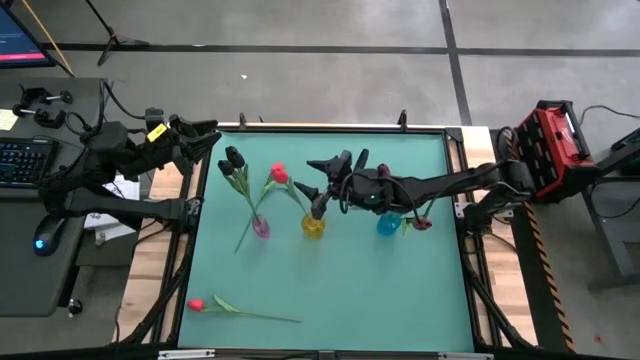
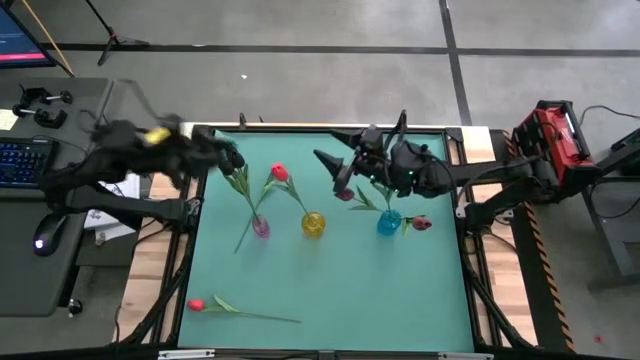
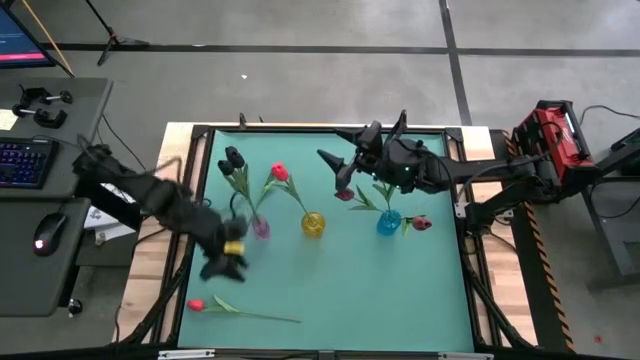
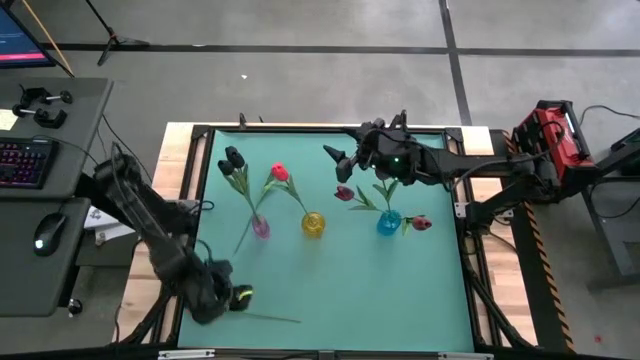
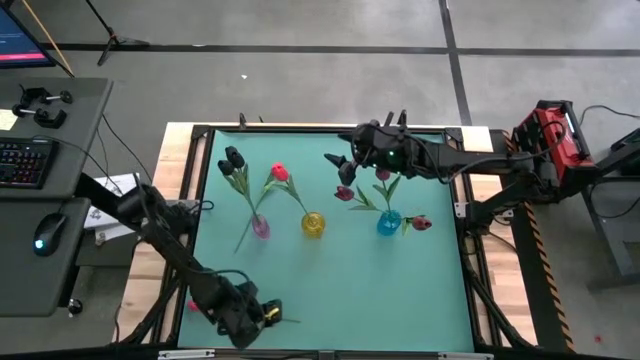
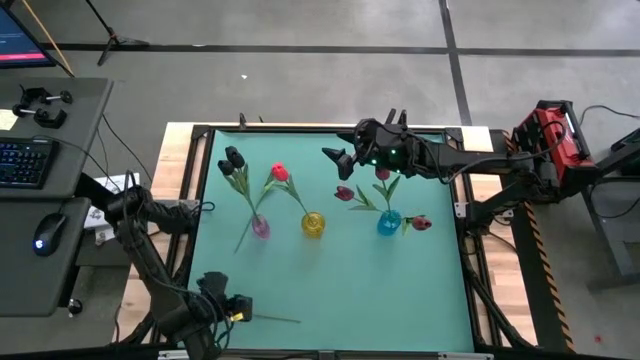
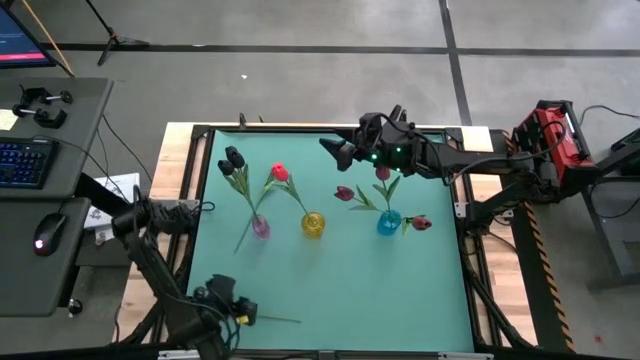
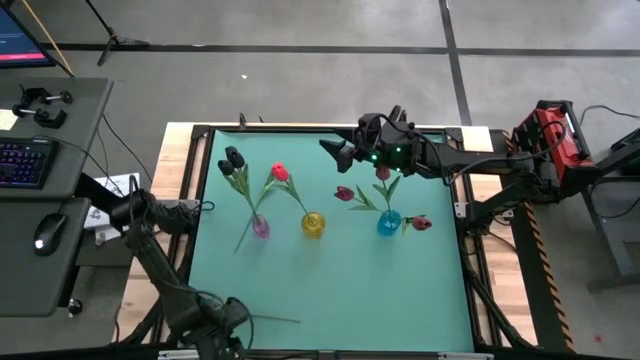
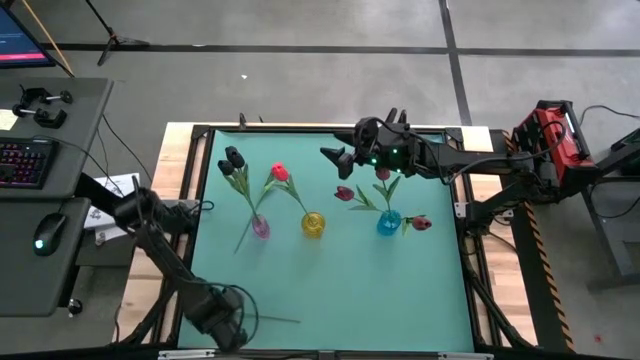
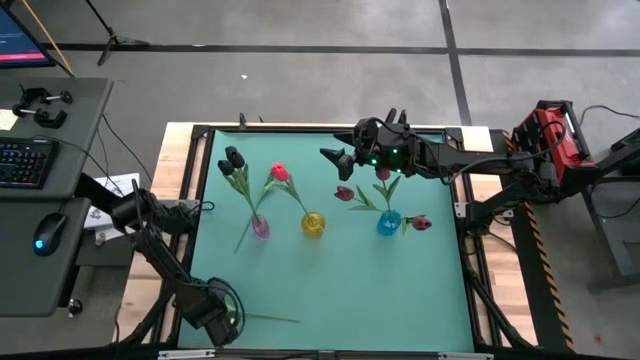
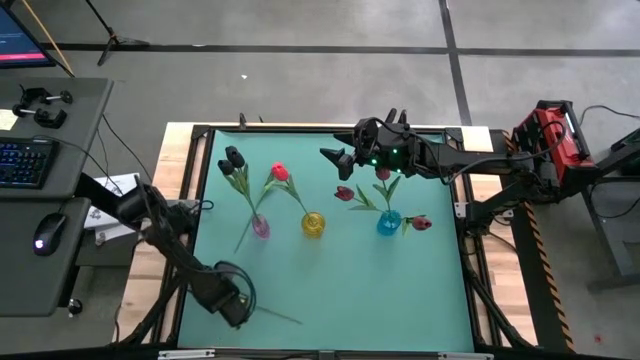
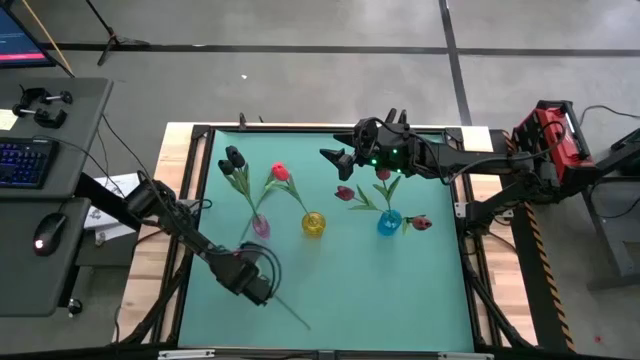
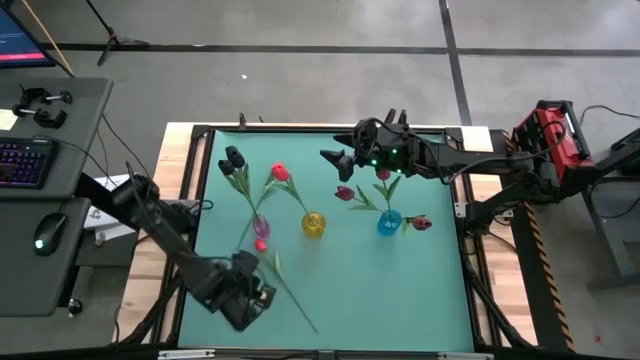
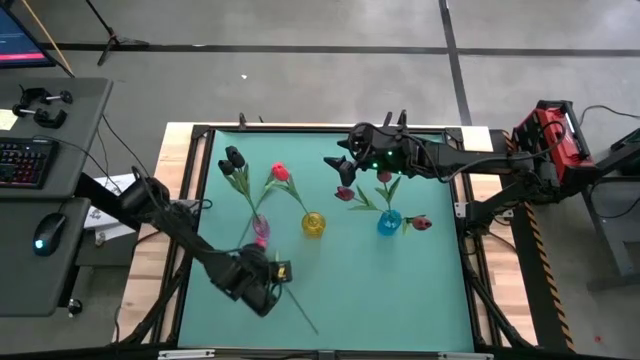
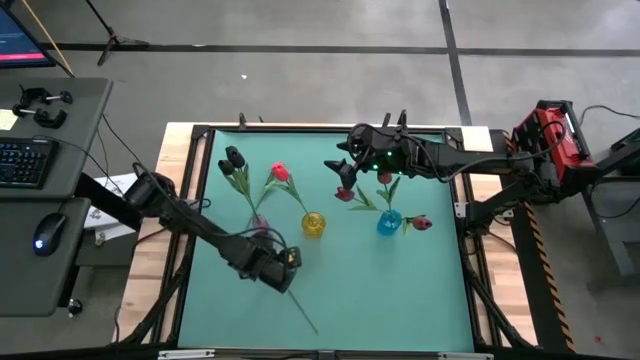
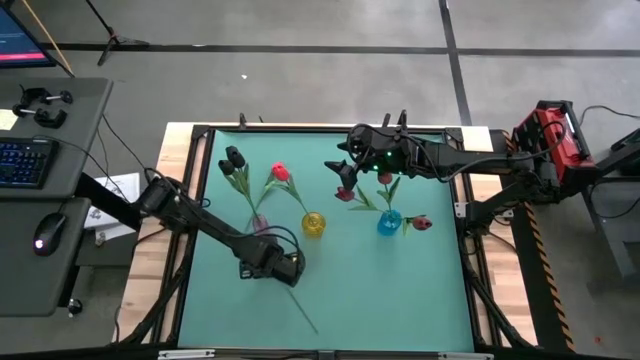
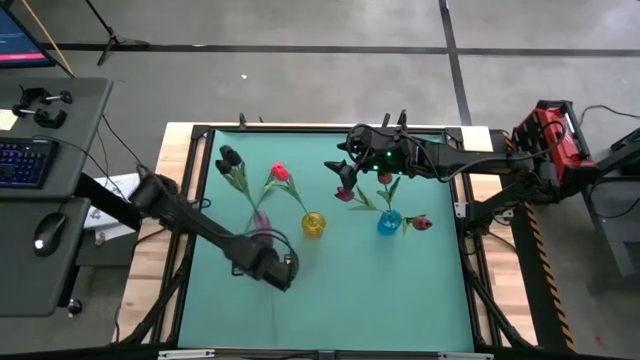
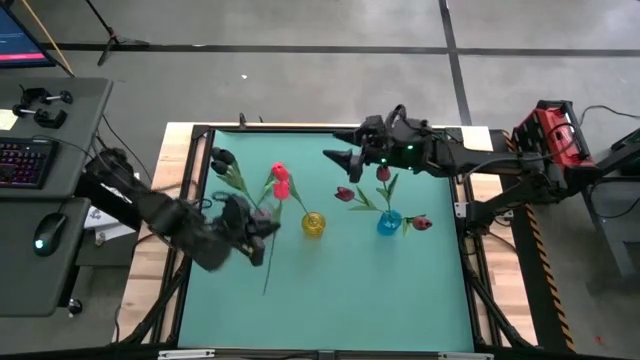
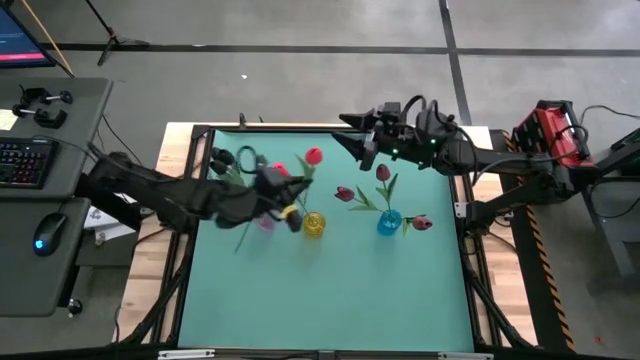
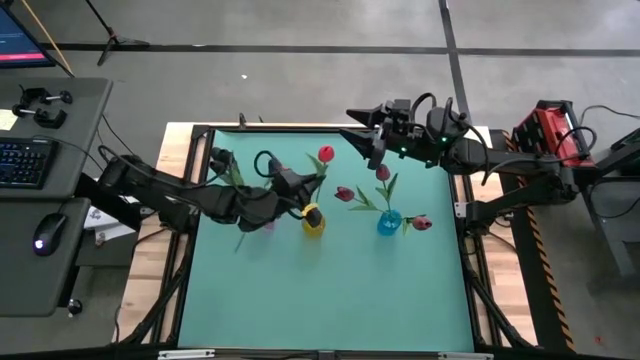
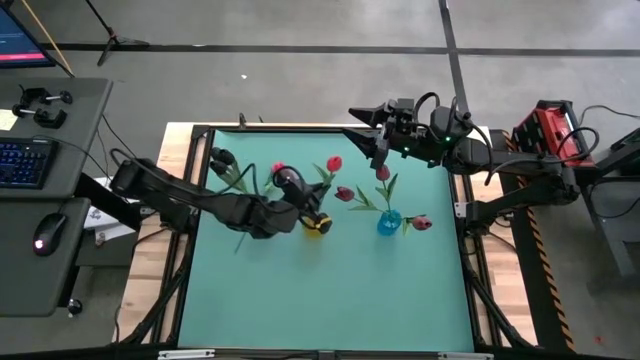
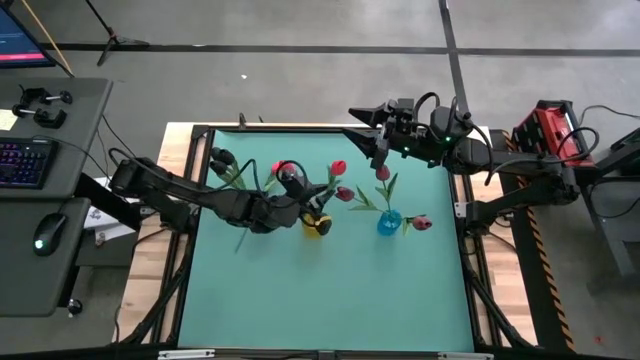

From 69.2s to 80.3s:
Task: Sort flowers into vase by color
Put the bottom pink flower into the yellow vase

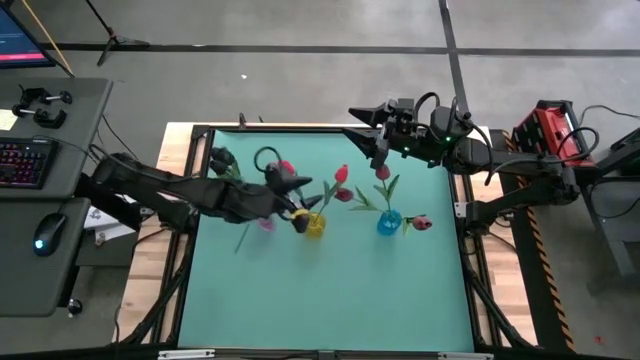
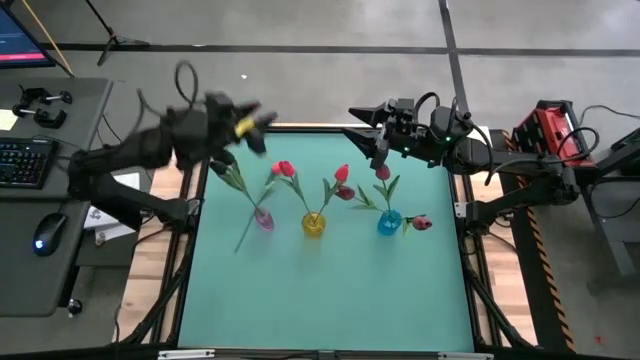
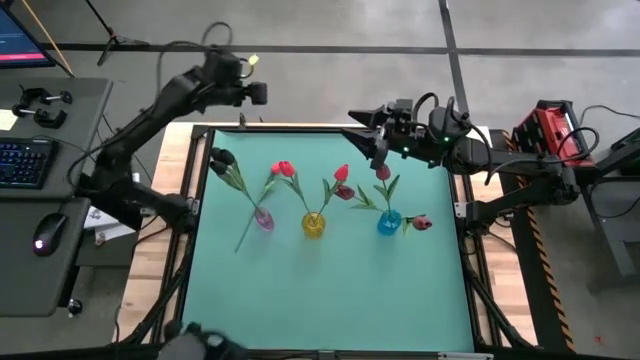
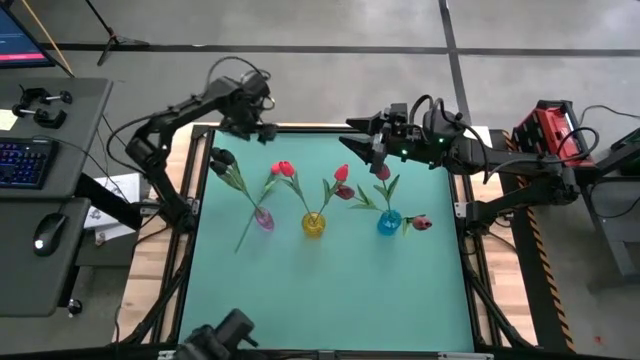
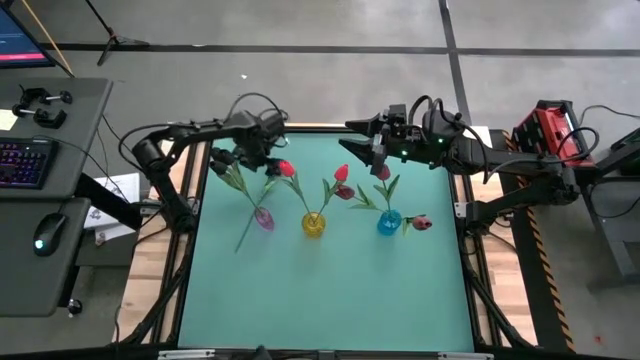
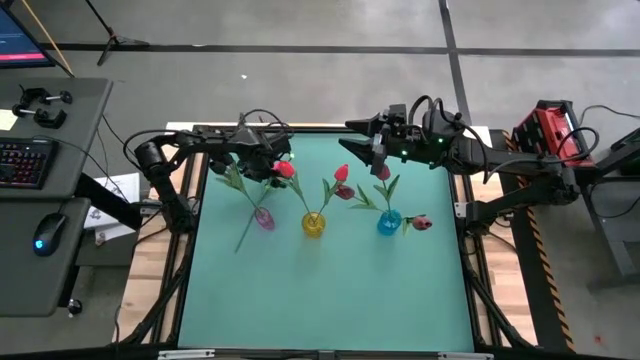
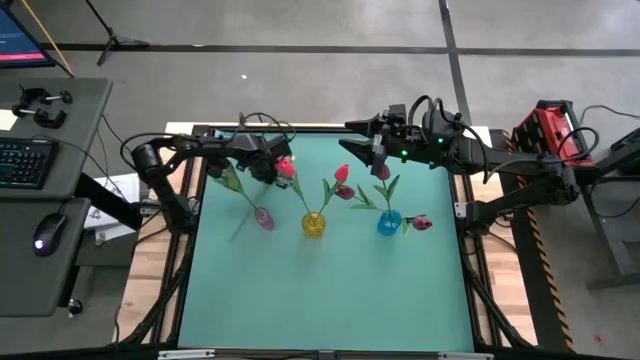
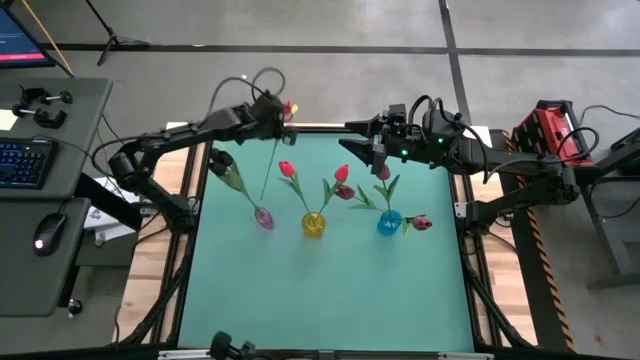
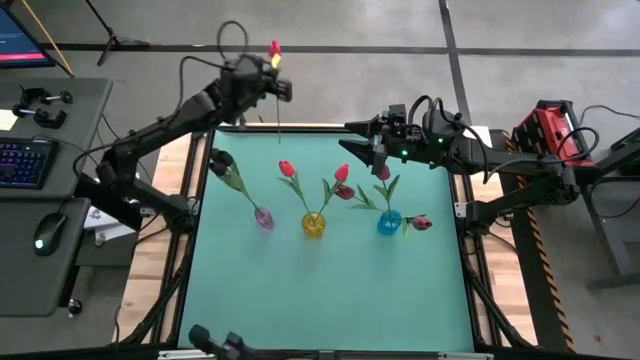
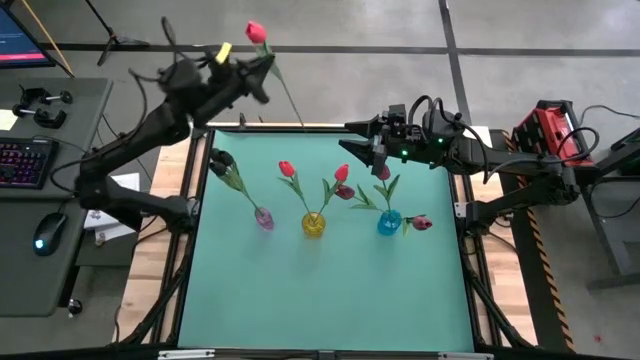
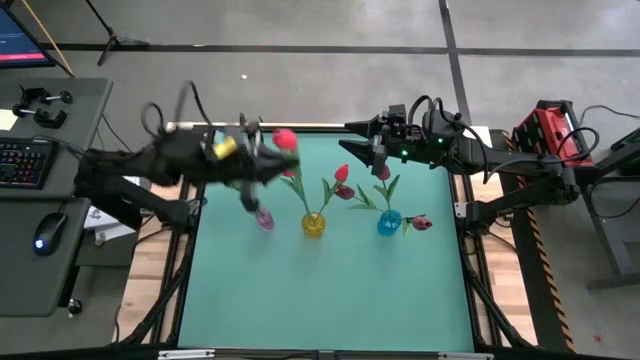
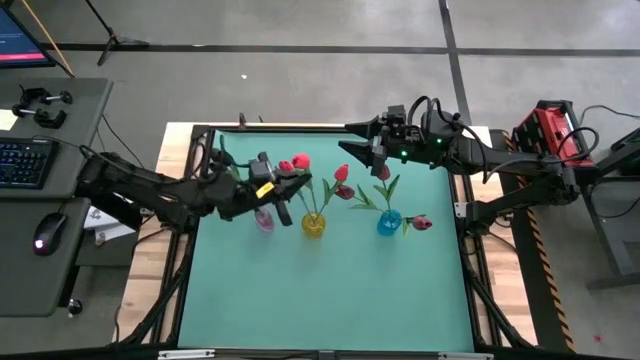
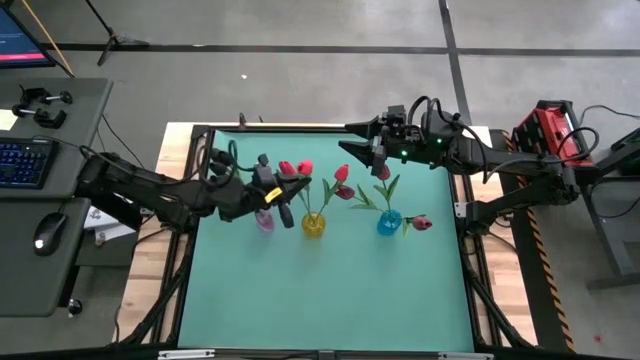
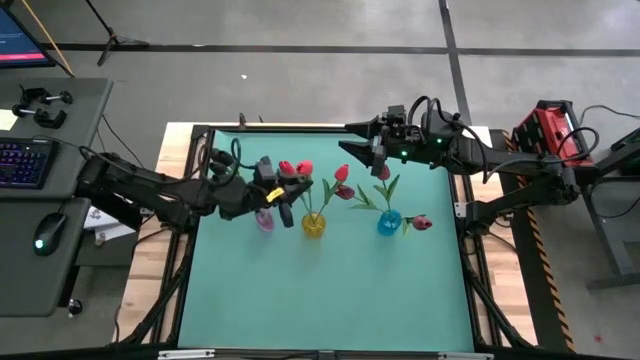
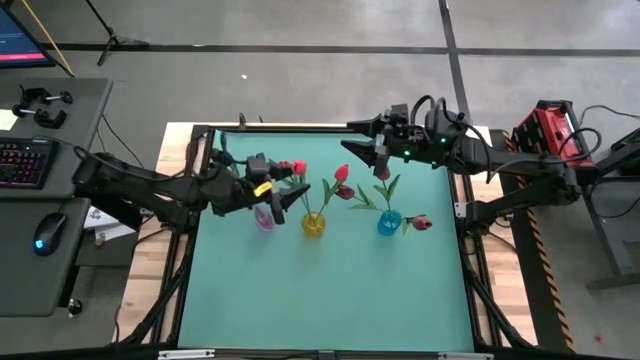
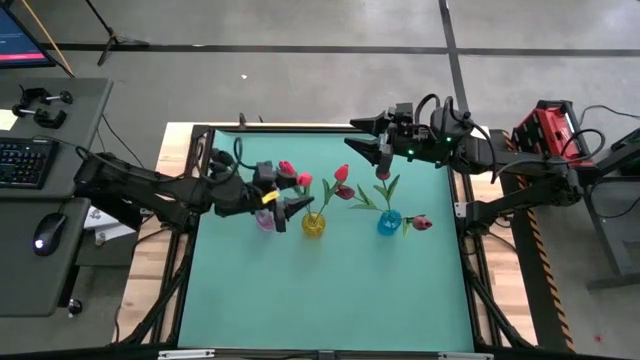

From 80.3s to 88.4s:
Put the pink flower into the yellow vase

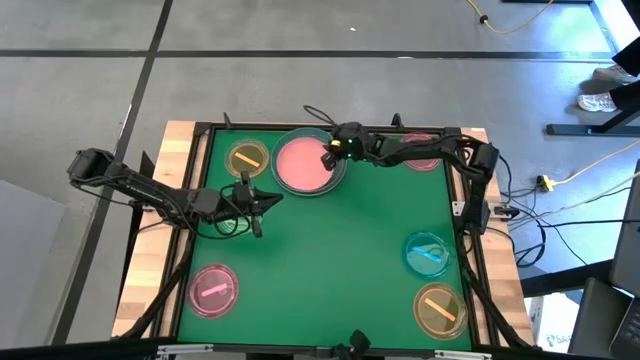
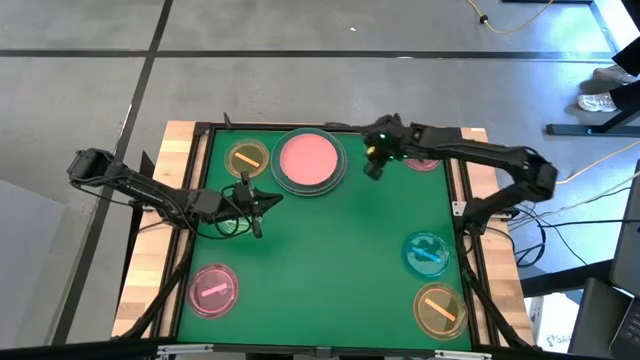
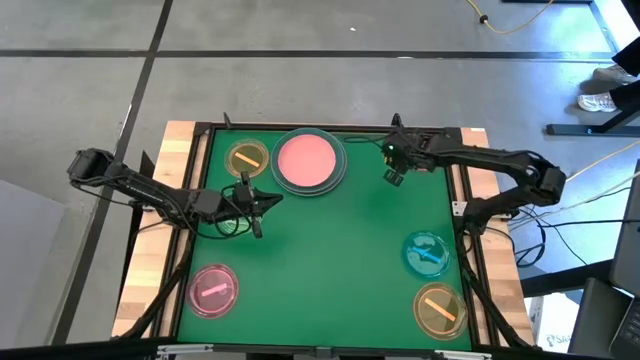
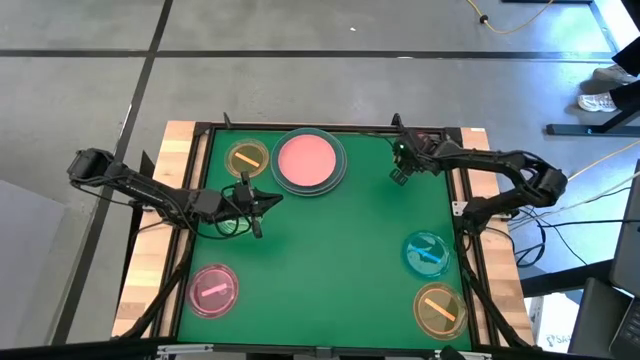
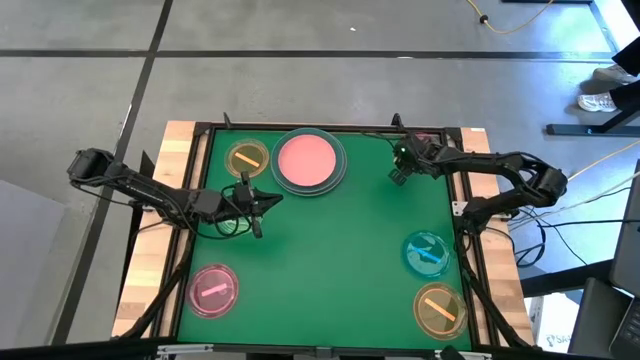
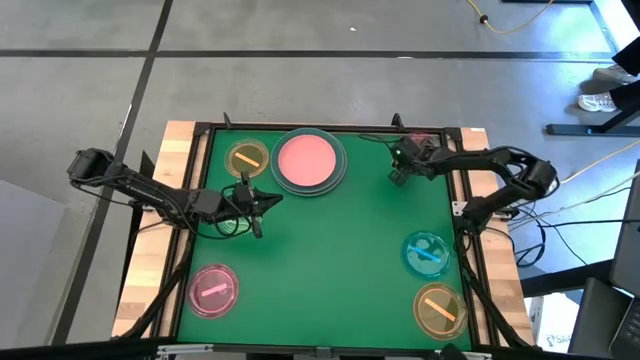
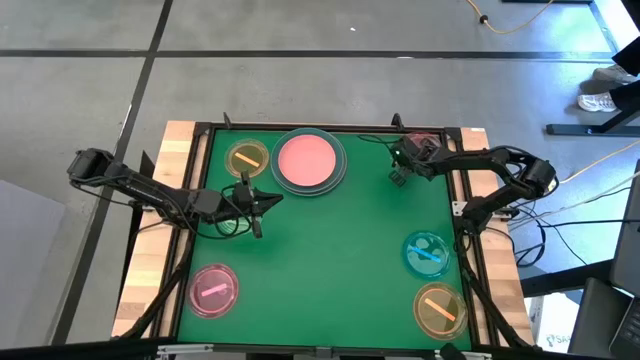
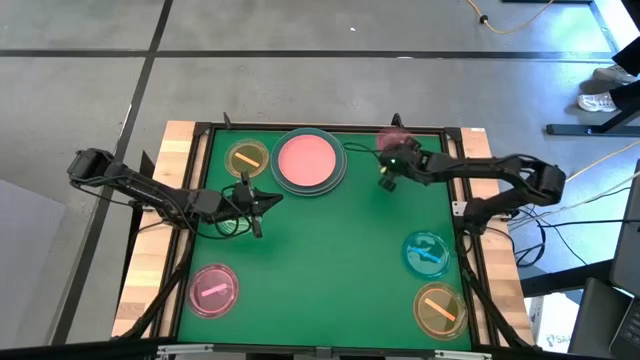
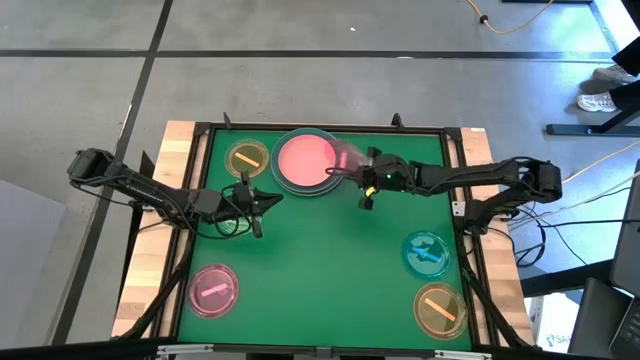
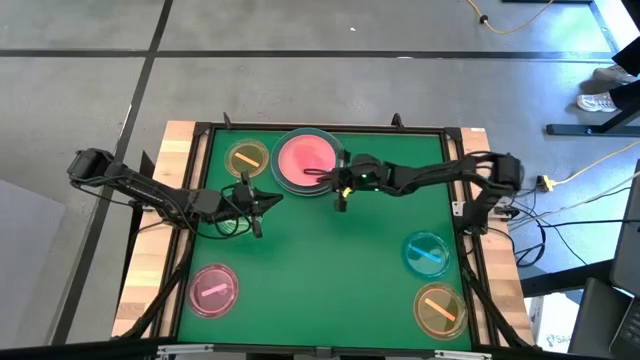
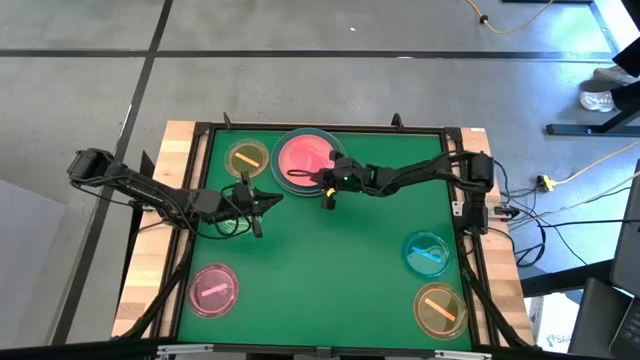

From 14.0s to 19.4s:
Task: Stack plastic plates
Stack the top pink plate on top of the light pink plate
